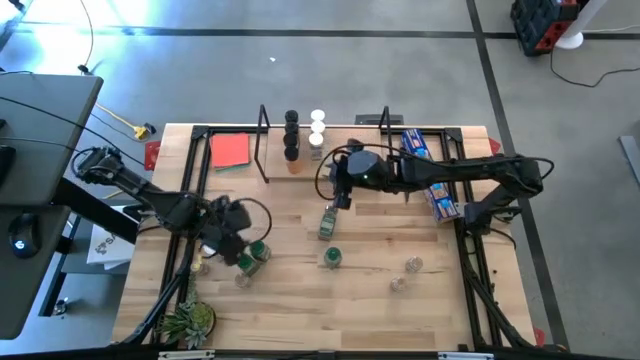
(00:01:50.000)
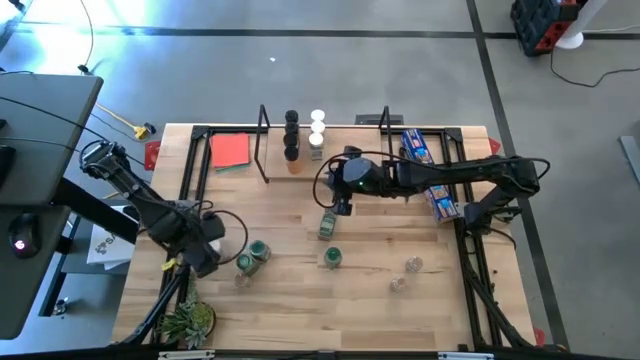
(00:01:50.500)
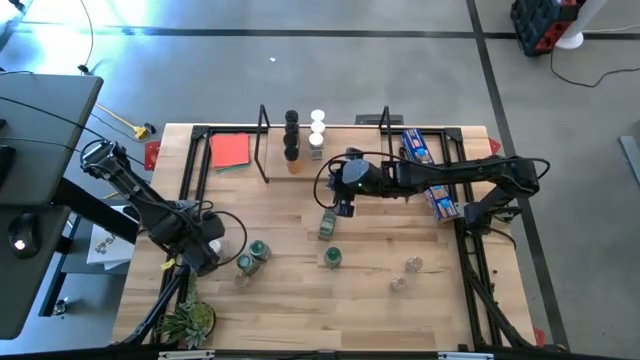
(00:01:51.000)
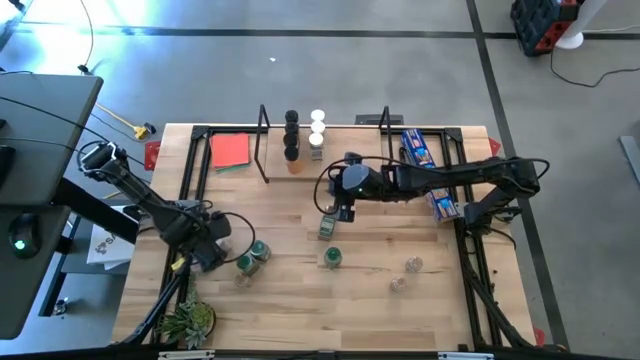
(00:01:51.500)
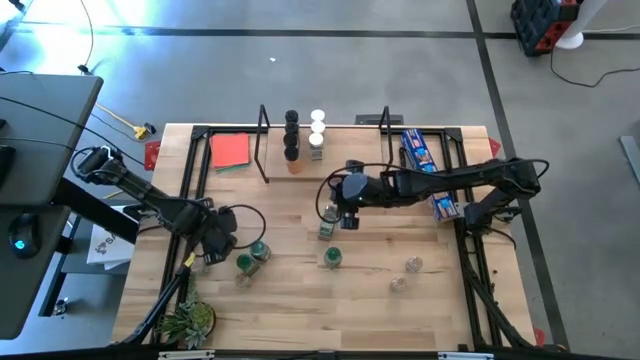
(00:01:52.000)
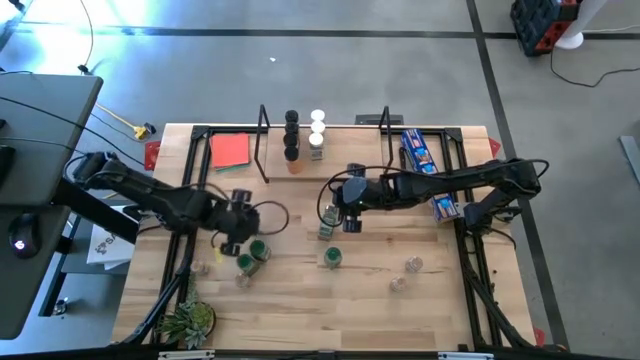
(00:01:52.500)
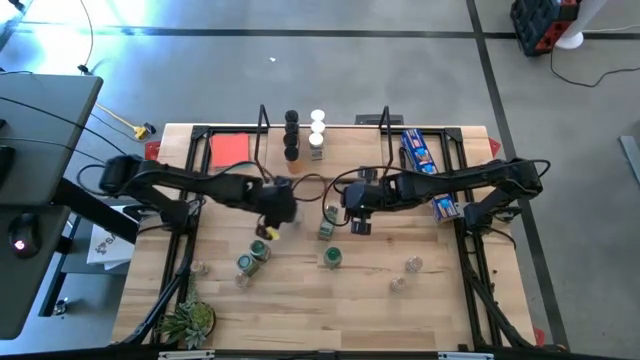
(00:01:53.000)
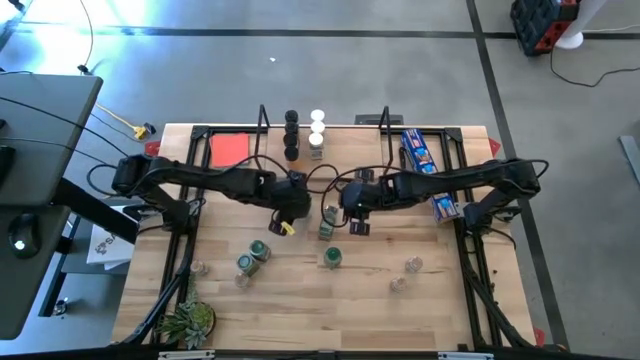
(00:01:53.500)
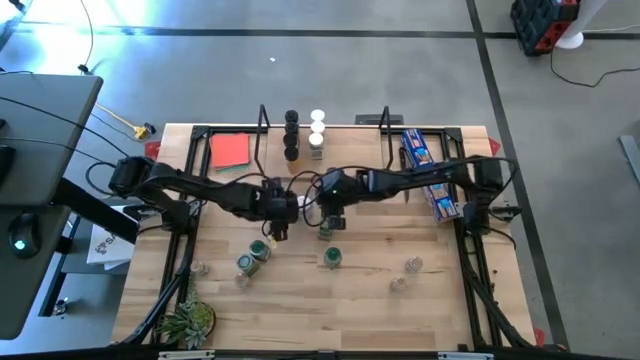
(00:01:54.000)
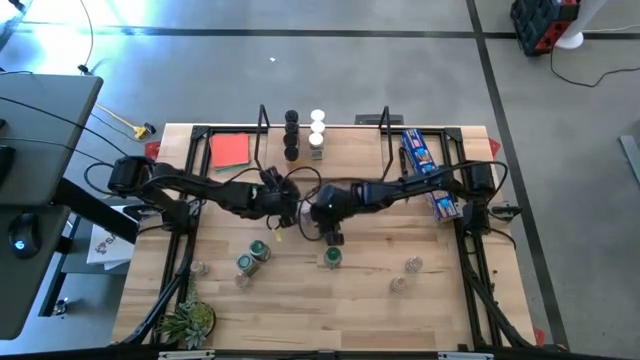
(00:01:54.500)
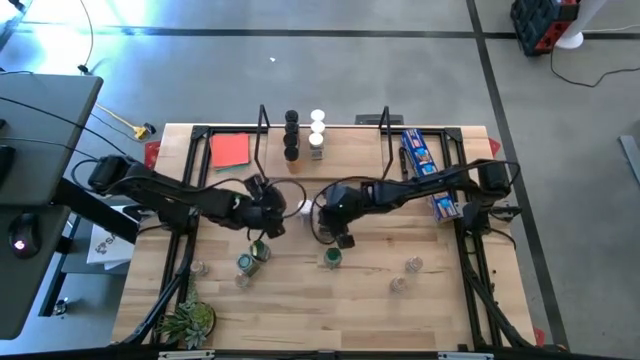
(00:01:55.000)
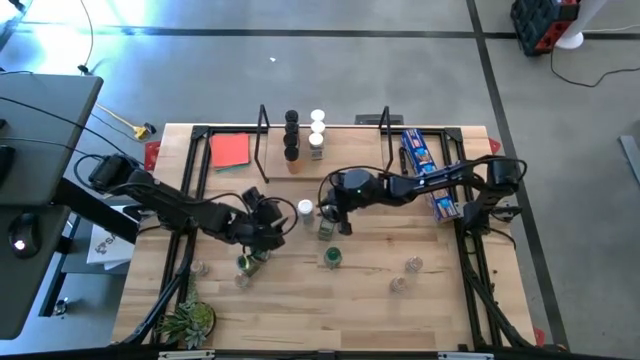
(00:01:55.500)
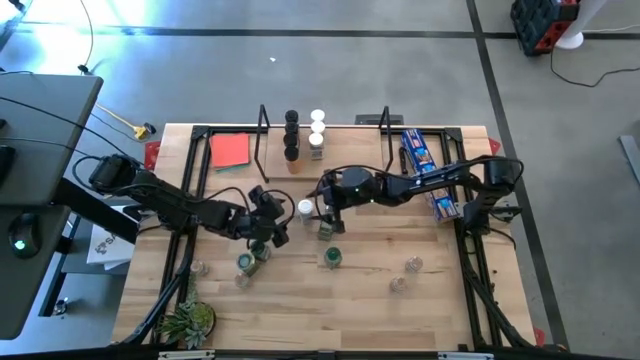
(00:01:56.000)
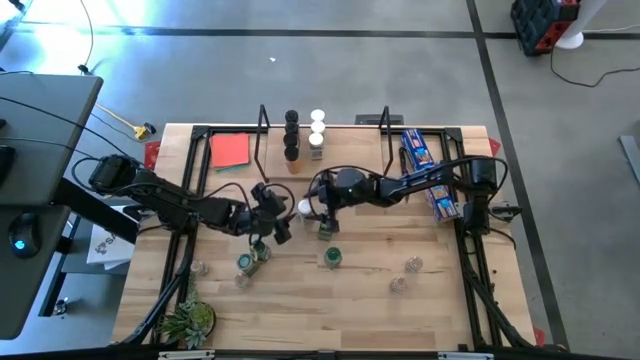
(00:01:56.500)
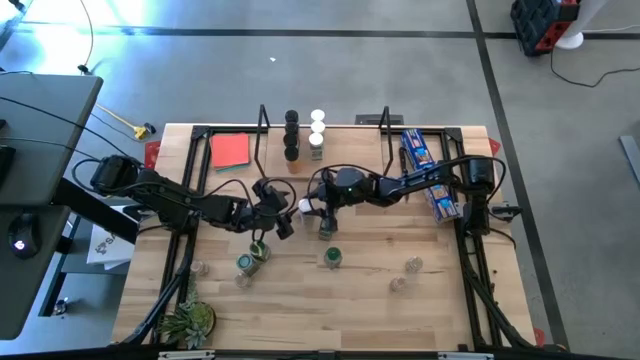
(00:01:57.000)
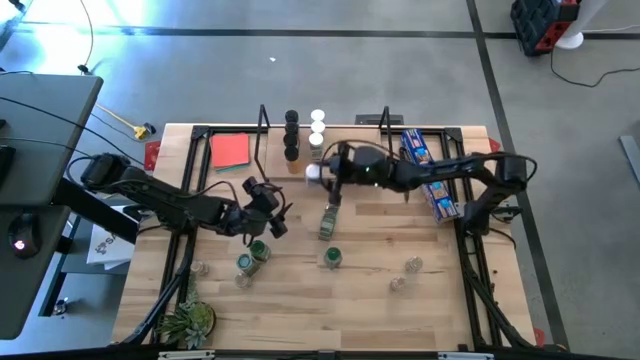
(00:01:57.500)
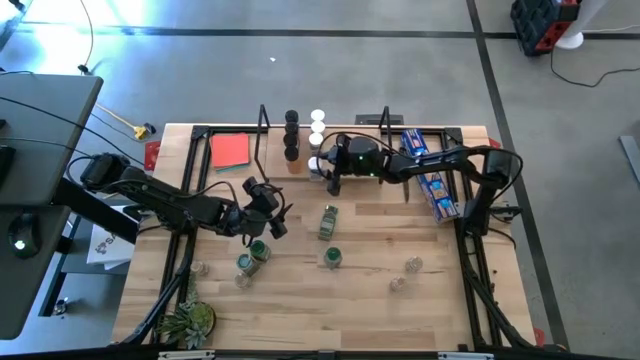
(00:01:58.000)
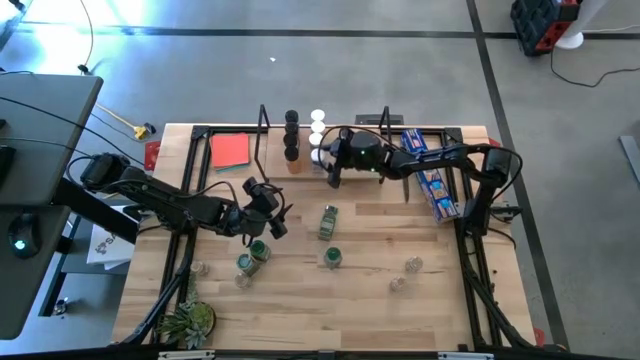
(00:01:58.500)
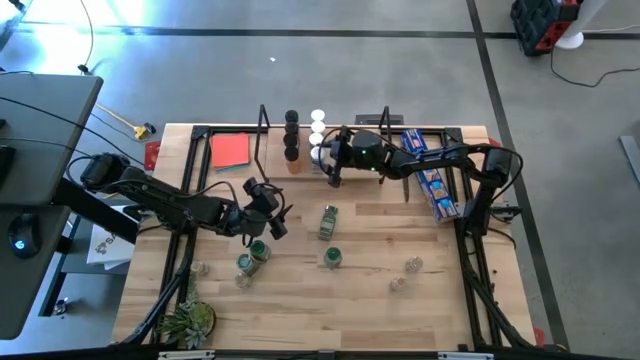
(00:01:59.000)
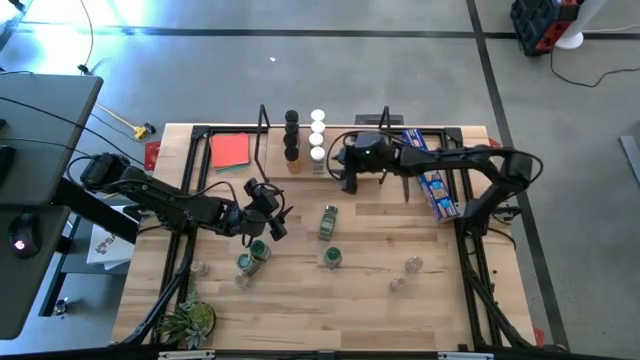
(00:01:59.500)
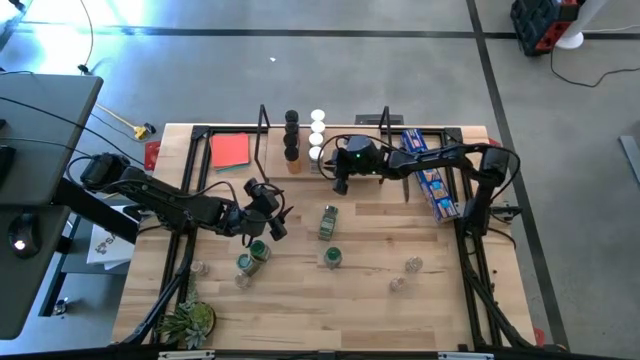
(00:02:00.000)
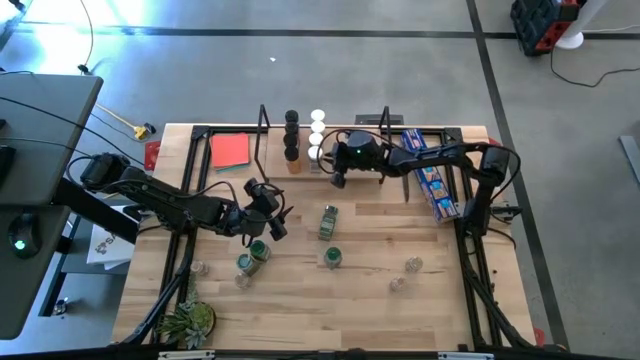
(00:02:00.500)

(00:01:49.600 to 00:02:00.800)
Task: Shelf spices
Put the white seasoning bottle on the shelf aligned with the other white seasoning bottles

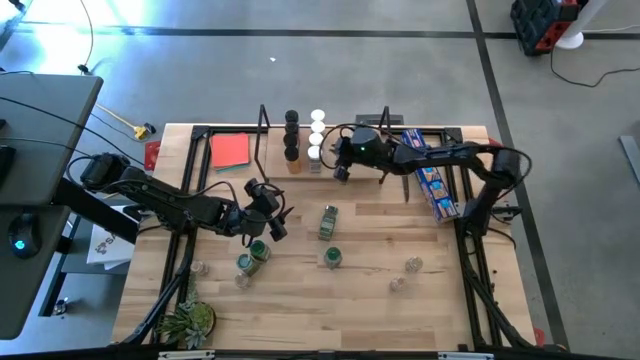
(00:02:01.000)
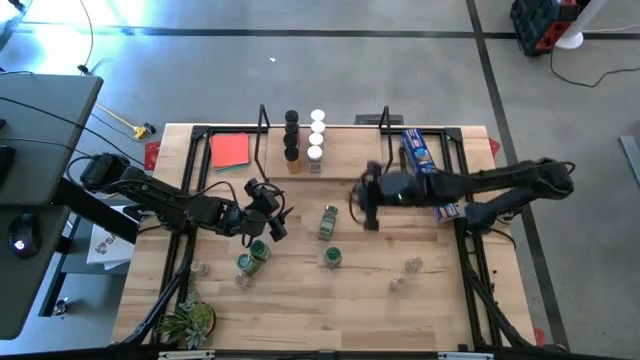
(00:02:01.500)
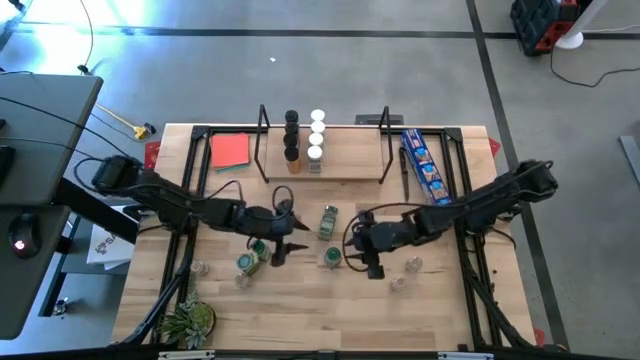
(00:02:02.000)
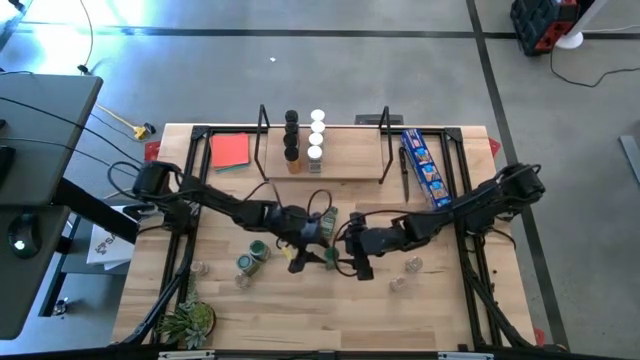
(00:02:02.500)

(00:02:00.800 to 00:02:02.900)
Put the green seasoning bottle on the shelf

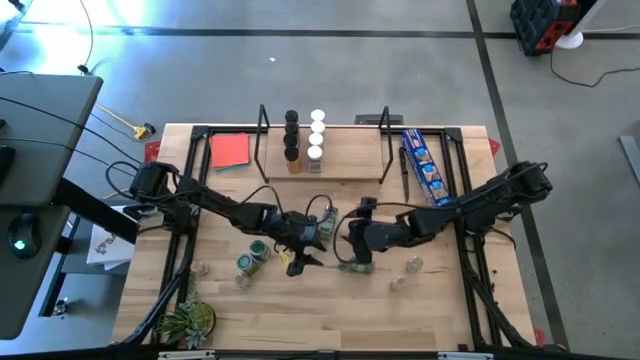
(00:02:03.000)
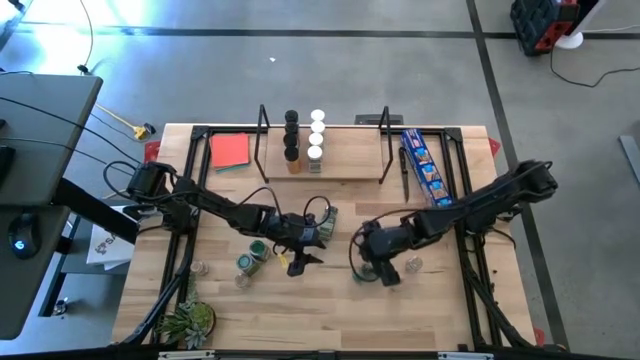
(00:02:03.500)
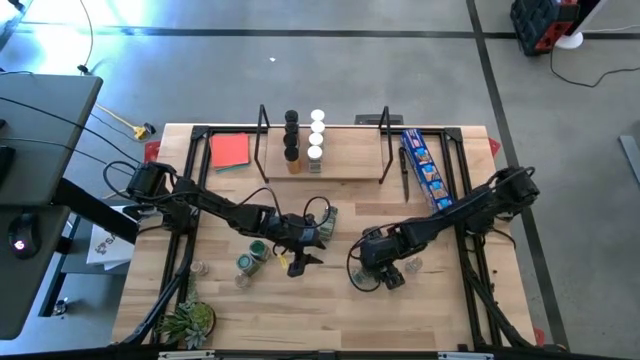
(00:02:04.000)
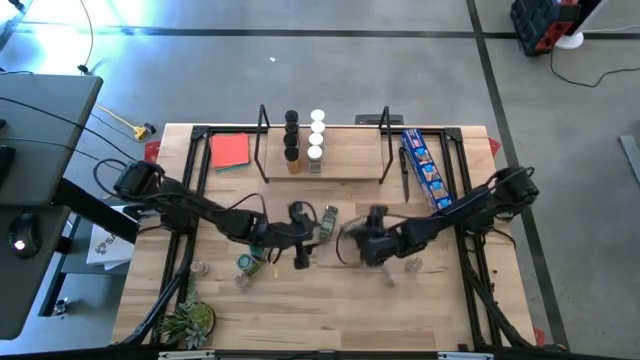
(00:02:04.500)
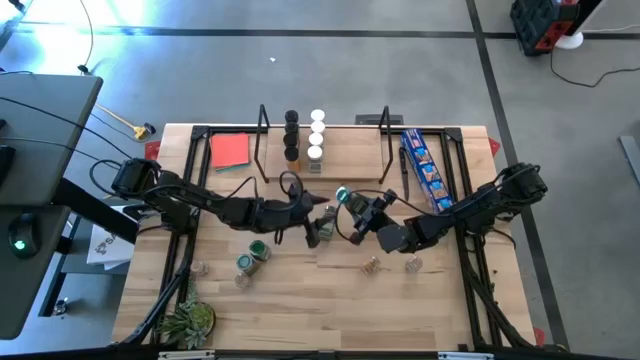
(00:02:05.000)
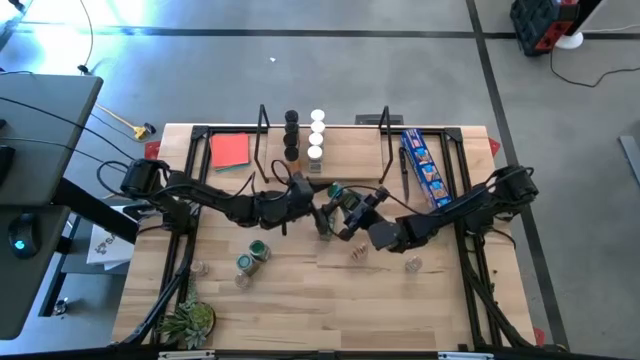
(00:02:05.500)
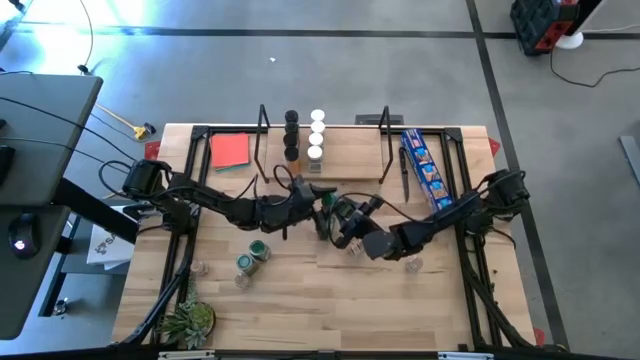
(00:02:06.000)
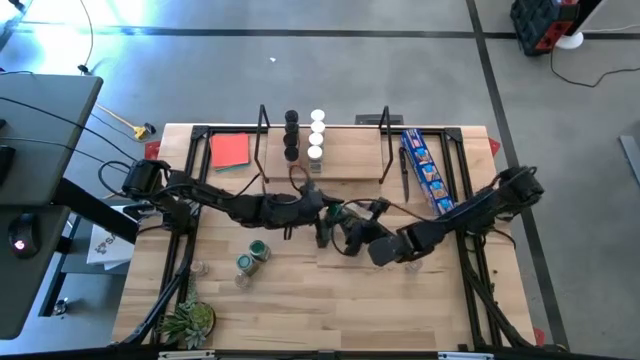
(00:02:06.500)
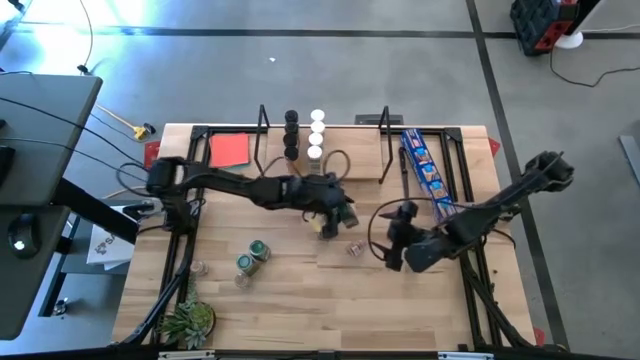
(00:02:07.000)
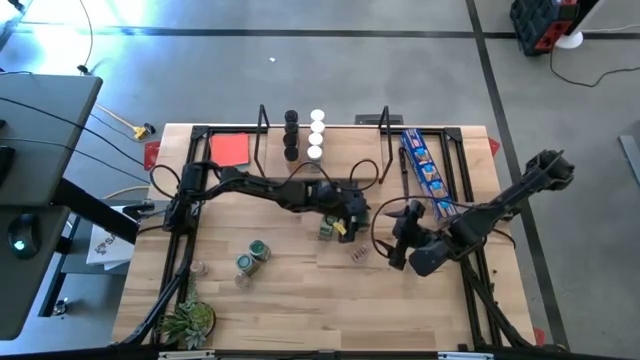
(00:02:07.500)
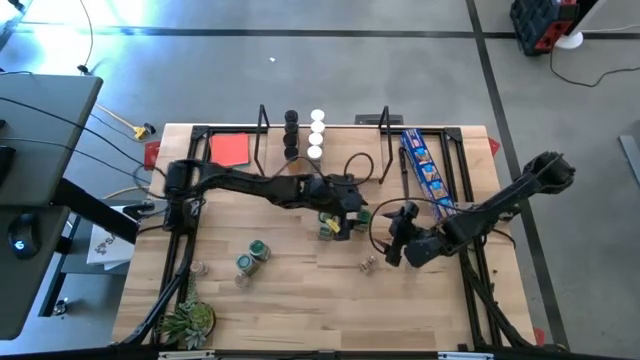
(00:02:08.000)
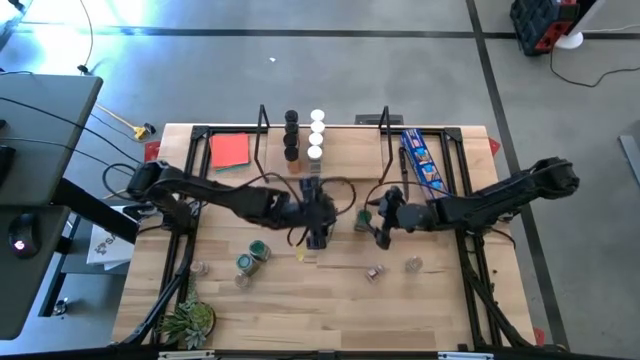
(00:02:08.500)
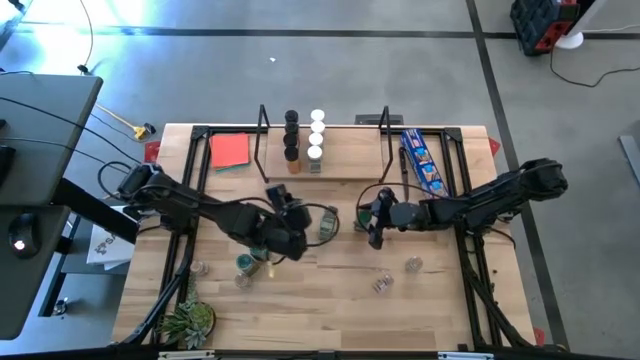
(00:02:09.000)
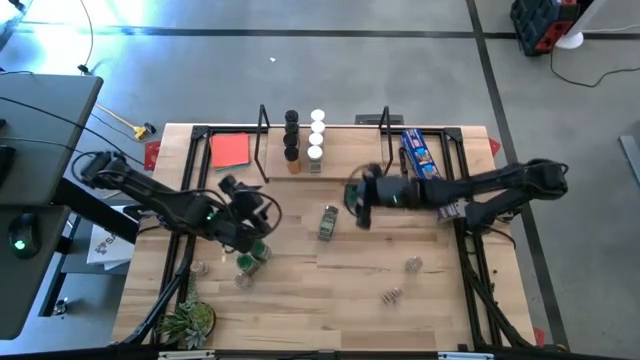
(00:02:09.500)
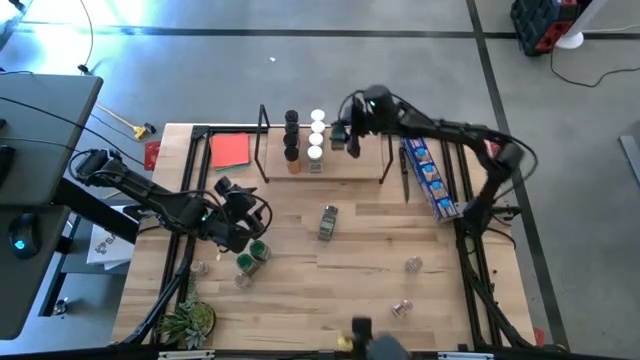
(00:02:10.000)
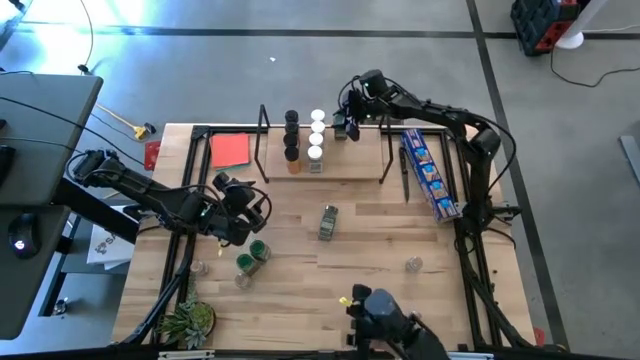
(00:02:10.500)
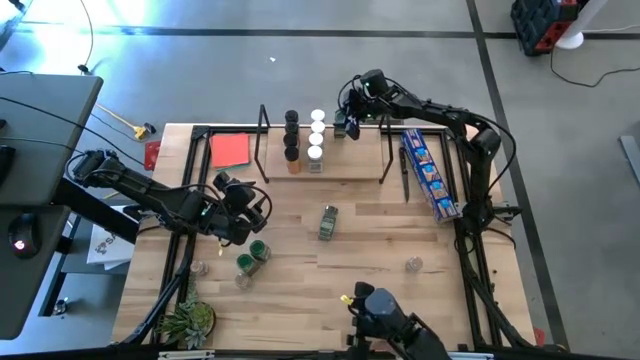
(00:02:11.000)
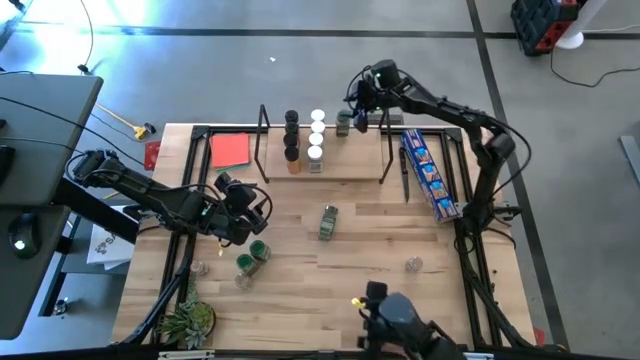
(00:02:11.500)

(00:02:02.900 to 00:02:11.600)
Put the green seasoning bottle on the shelf
